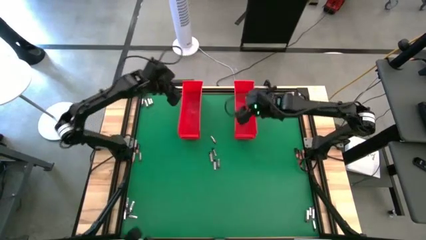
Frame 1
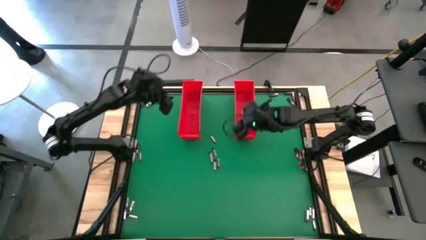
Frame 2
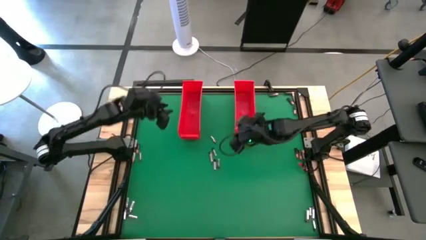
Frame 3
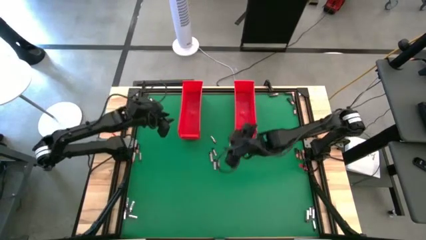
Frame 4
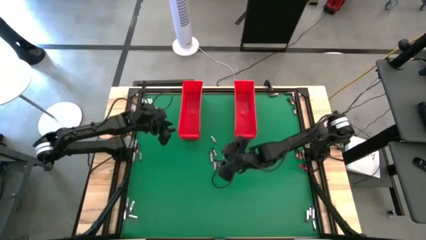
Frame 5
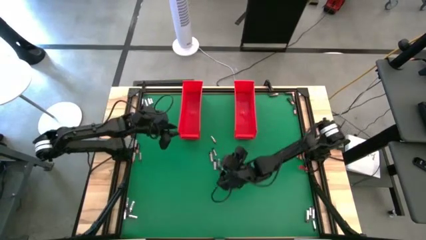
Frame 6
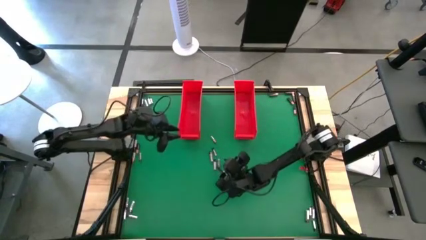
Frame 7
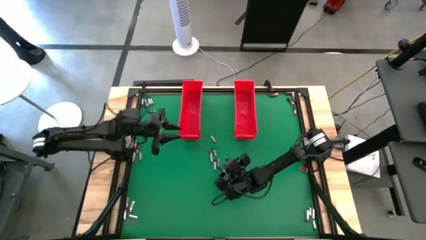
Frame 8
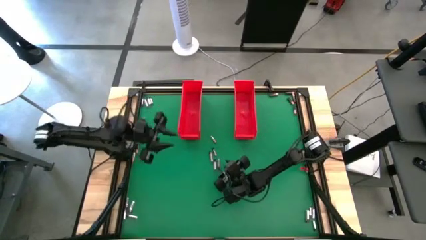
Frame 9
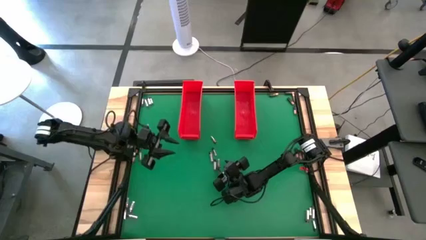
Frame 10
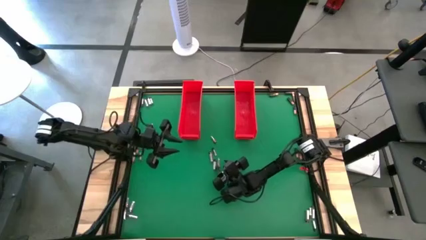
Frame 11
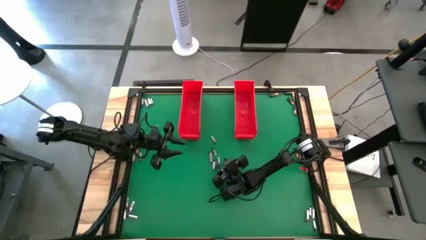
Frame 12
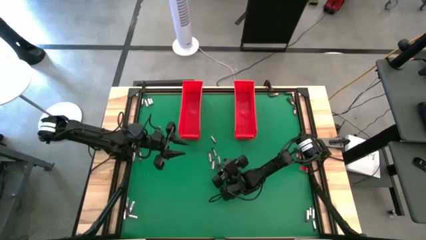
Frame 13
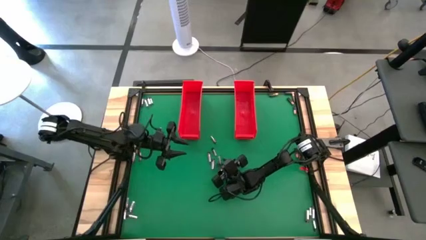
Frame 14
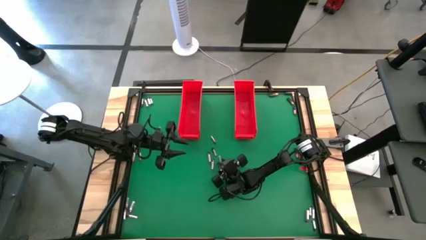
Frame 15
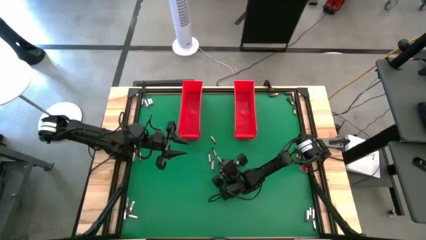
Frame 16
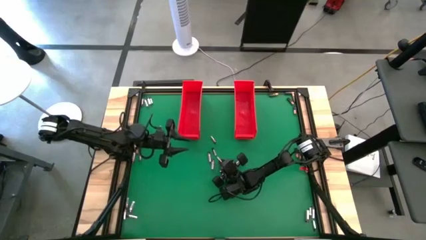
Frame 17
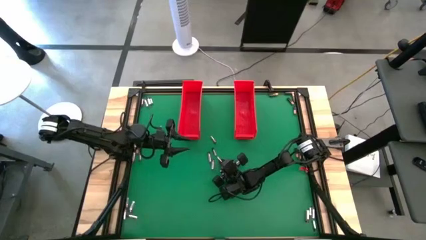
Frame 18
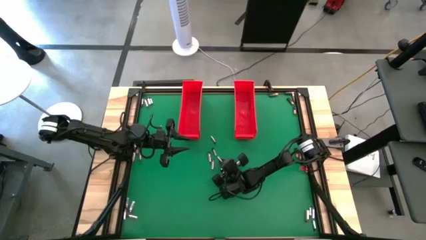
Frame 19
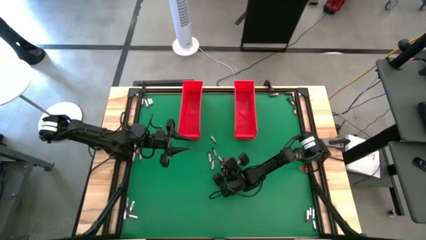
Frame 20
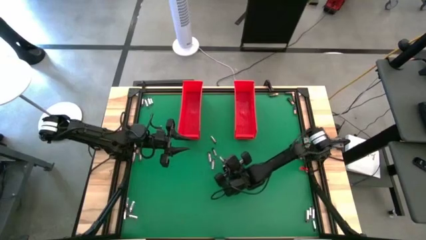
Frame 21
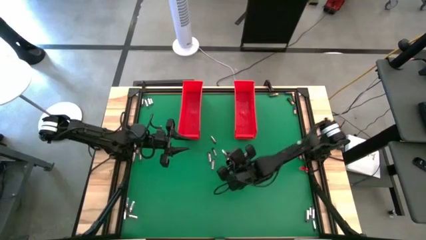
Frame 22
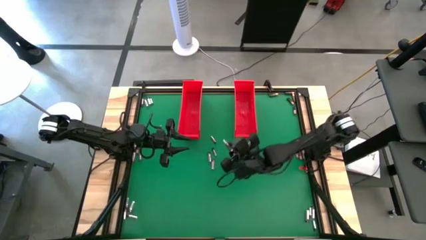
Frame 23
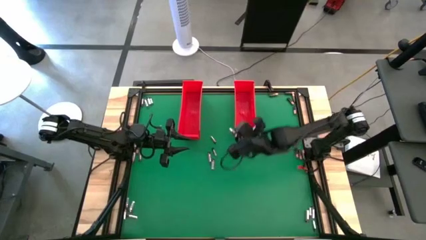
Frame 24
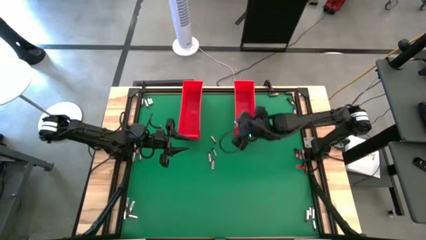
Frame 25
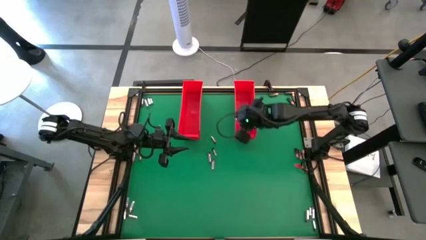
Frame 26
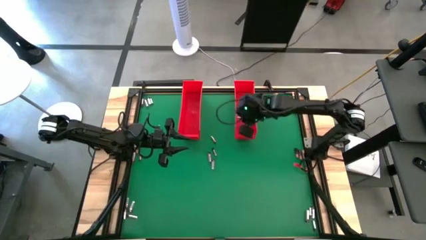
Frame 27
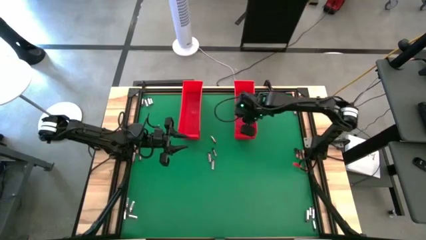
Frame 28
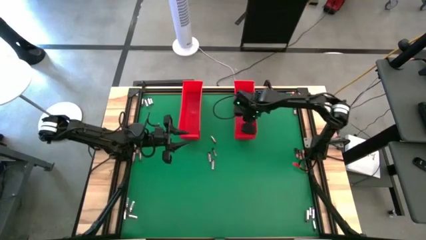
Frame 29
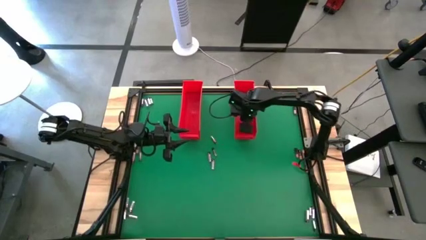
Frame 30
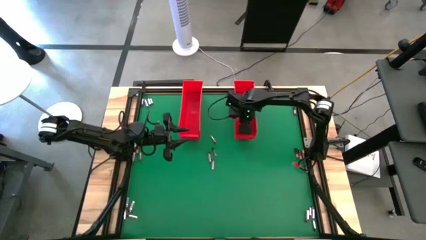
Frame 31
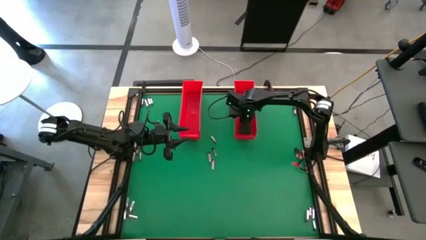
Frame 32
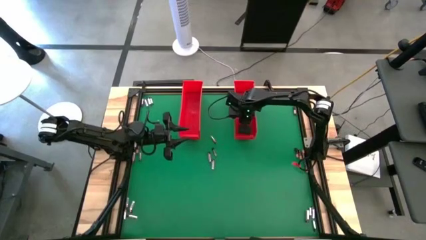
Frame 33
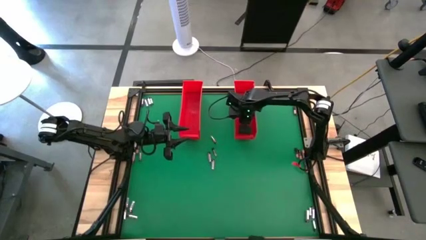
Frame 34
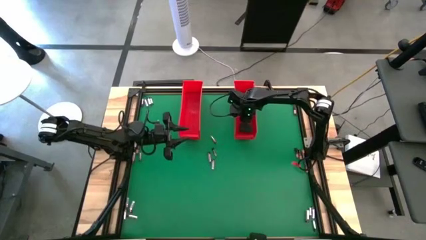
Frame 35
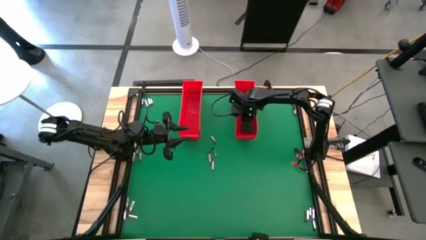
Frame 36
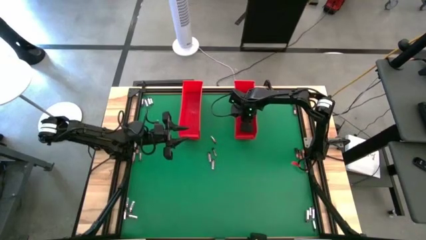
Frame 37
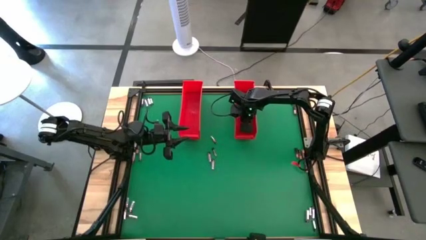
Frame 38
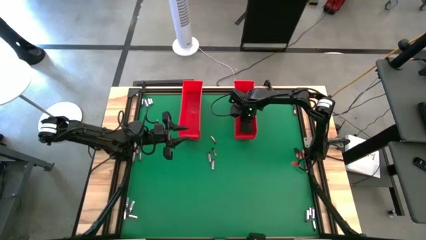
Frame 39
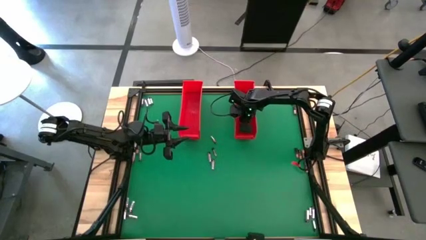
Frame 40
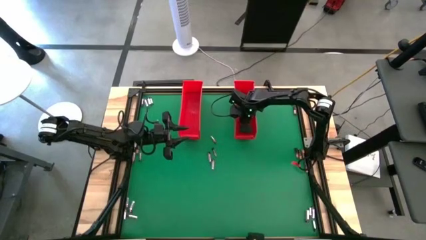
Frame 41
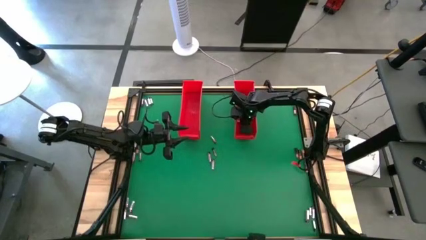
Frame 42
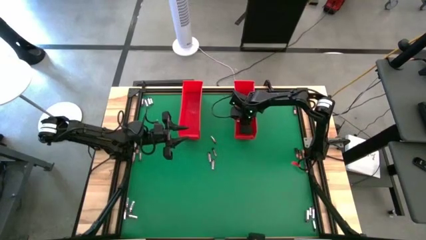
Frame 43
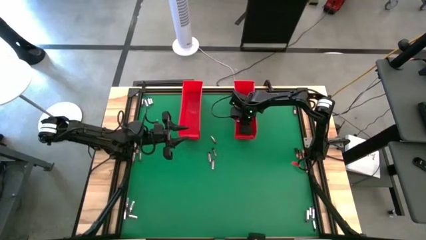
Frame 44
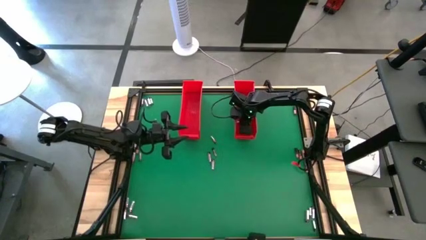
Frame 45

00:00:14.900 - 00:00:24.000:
Task: Sort batteries
Put the silver battery into the right red bin

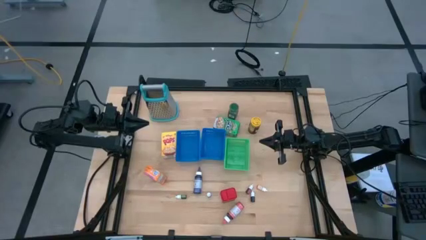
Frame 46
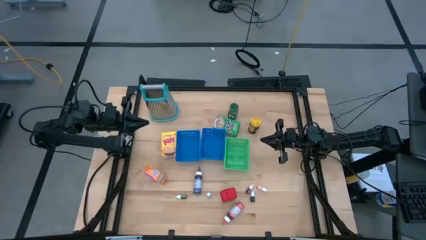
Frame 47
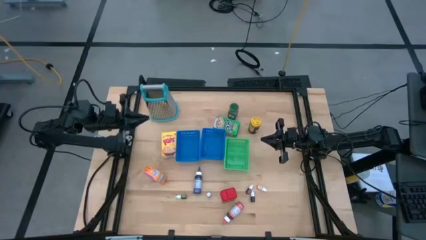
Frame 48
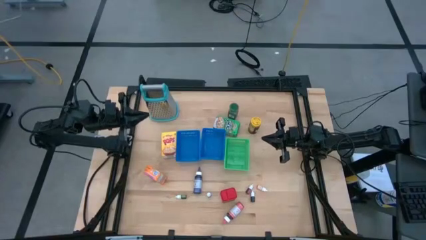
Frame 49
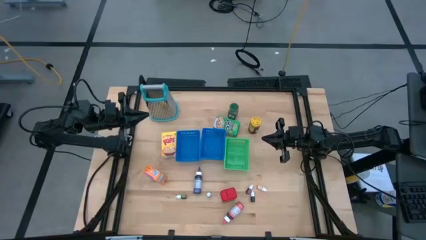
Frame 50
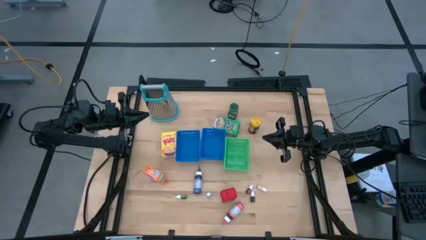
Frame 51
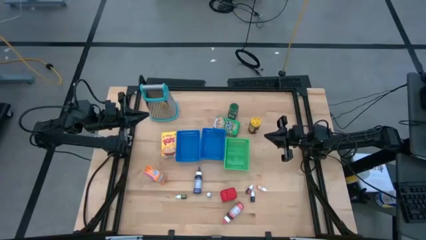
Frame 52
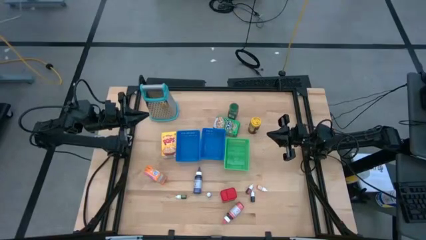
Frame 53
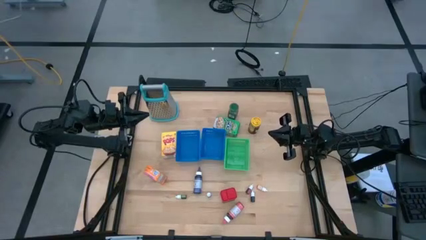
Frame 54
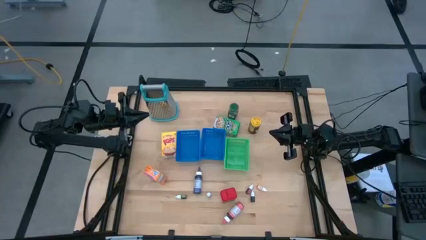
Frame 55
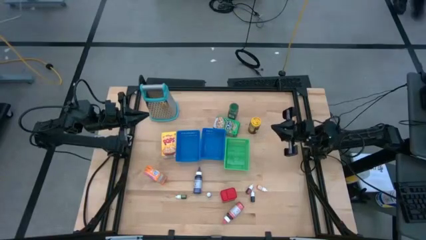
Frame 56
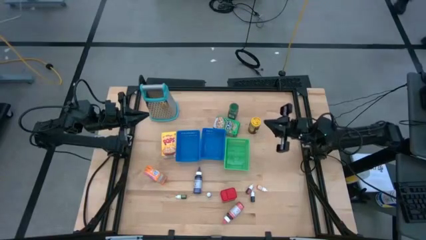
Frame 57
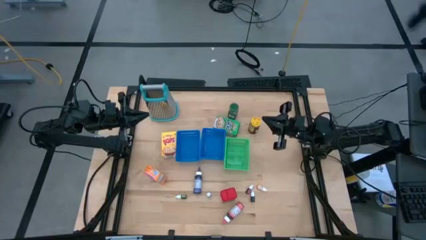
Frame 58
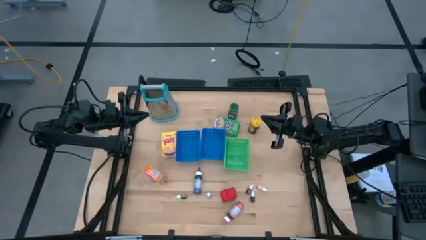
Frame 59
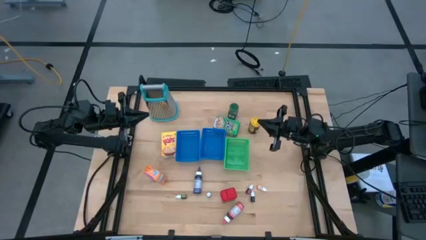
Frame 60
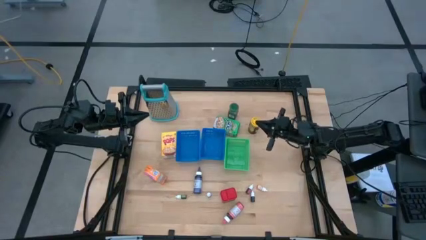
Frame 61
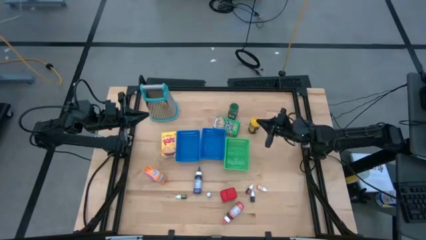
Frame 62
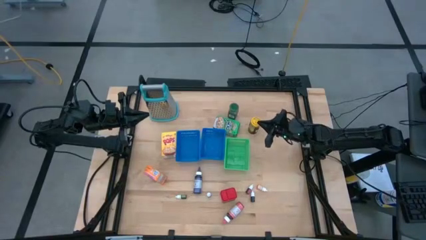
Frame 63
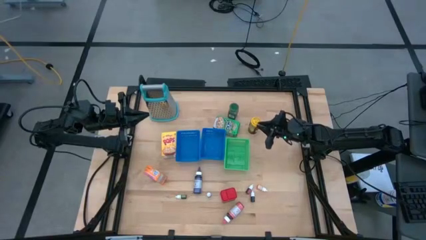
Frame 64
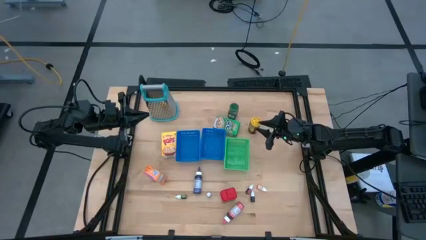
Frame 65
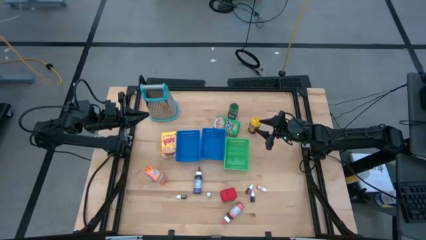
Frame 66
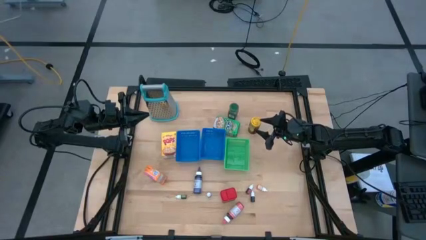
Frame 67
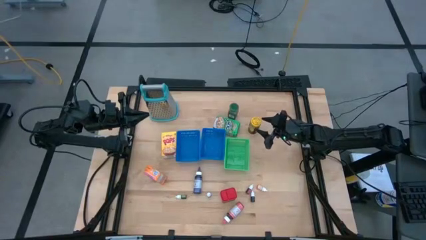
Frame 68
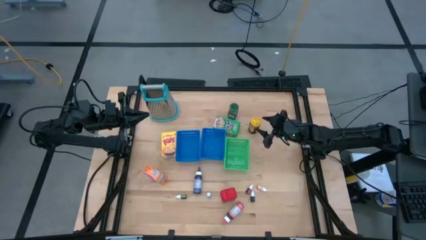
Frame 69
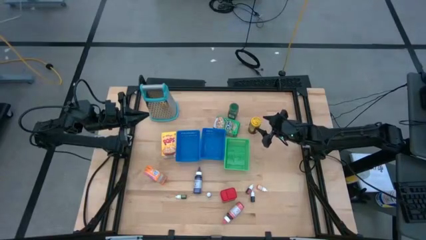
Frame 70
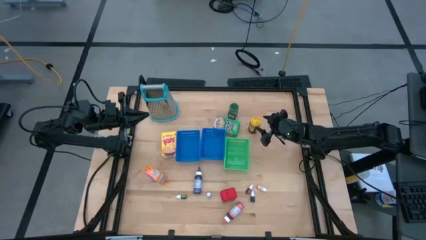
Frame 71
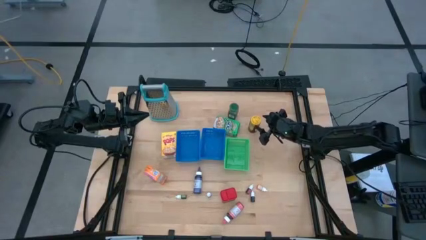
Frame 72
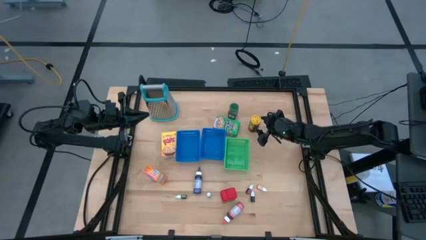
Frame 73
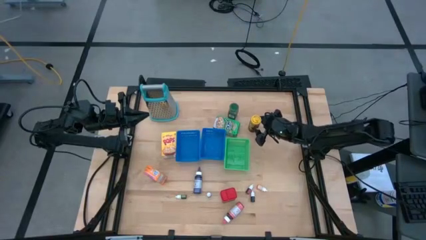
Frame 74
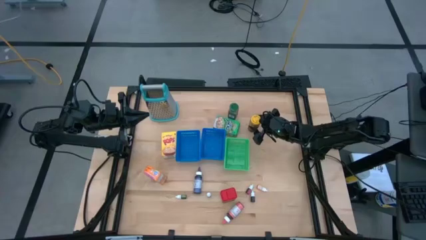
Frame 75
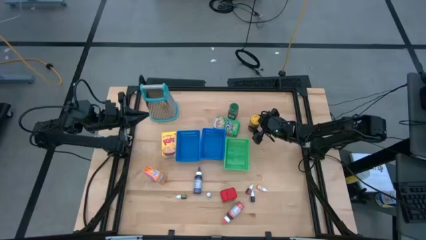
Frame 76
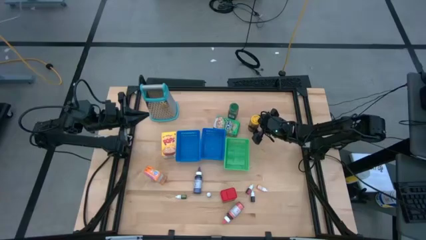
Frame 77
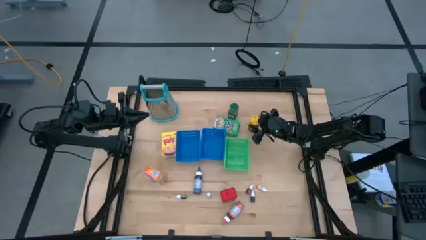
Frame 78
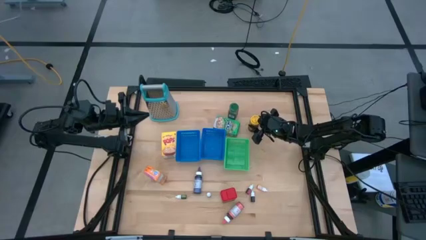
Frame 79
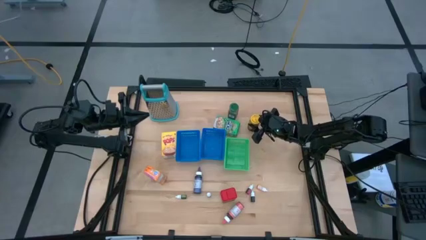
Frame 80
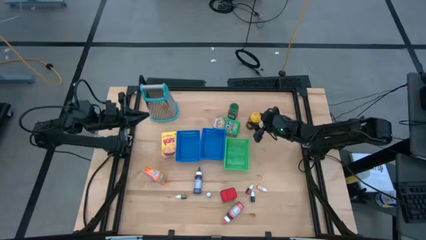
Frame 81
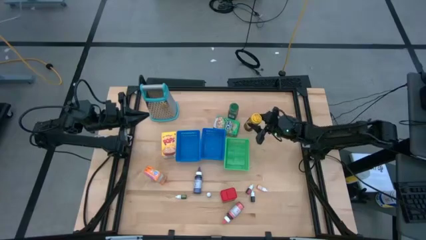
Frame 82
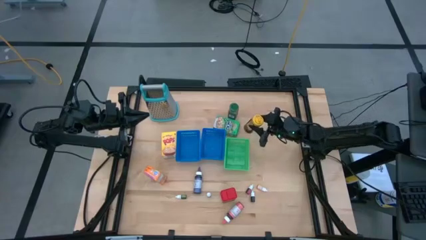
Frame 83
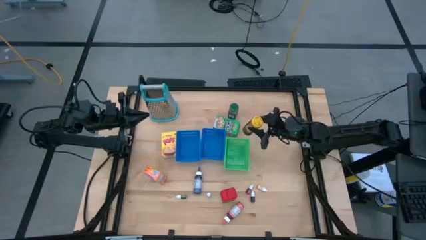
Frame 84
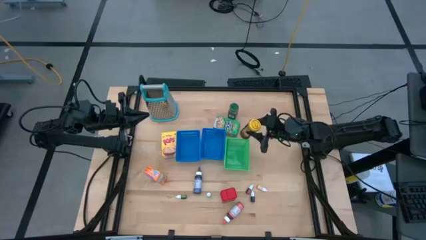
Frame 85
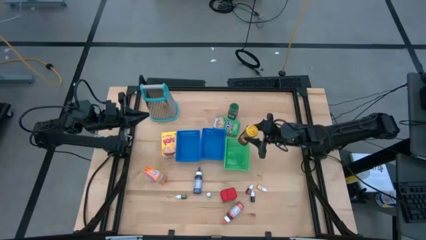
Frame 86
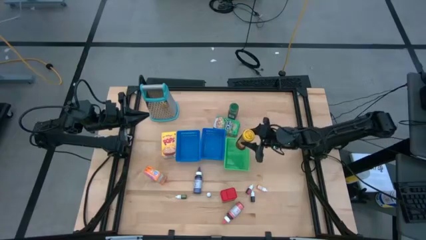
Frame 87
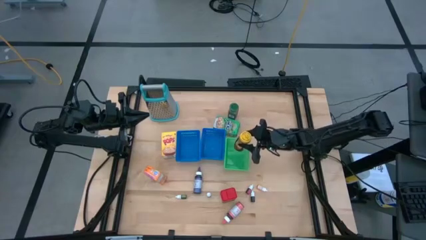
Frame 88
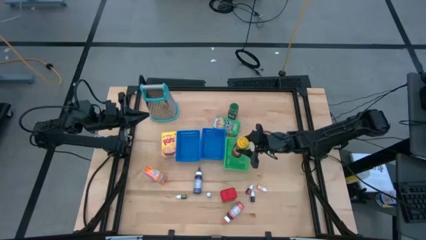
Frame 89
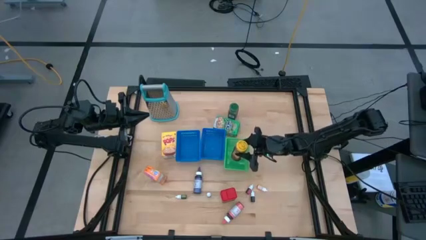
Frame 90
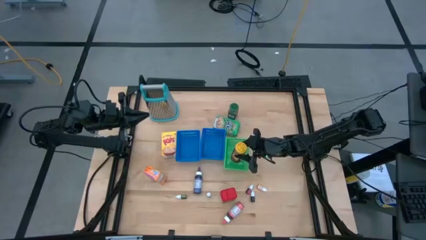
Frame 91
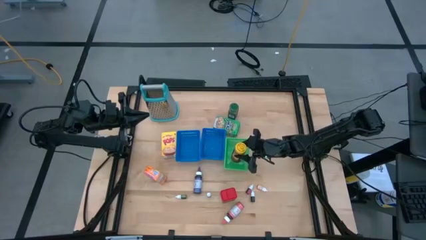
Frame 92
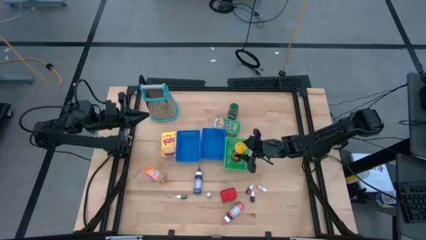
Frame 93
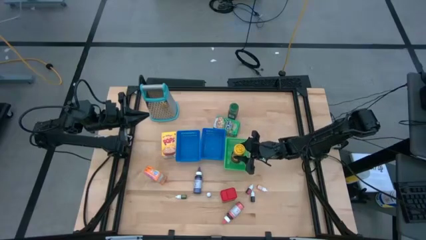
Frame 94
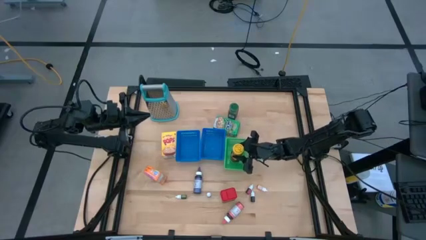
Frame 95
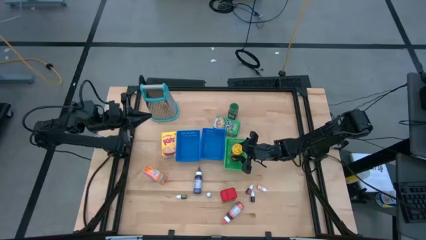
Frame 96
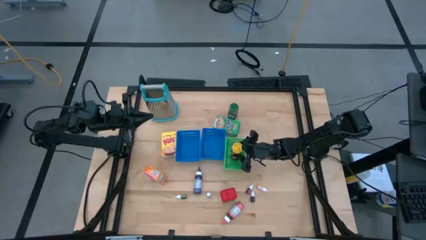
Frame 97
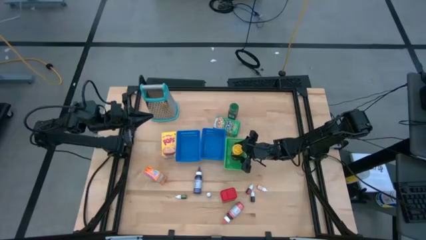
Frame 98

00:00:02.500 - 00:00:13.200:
Task: Pick & Place Kitchen Items
Put the yellow seasoning bottle into the green bin
